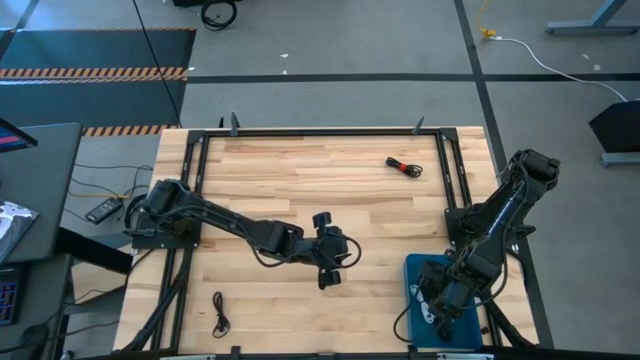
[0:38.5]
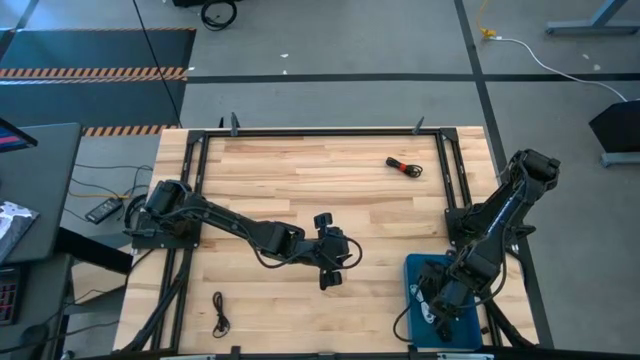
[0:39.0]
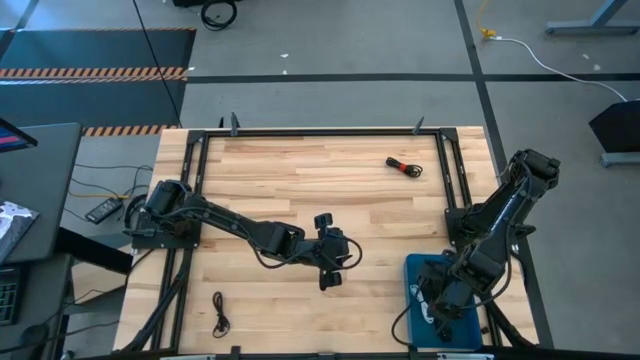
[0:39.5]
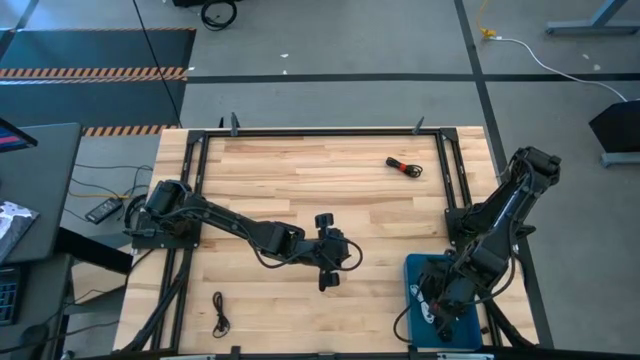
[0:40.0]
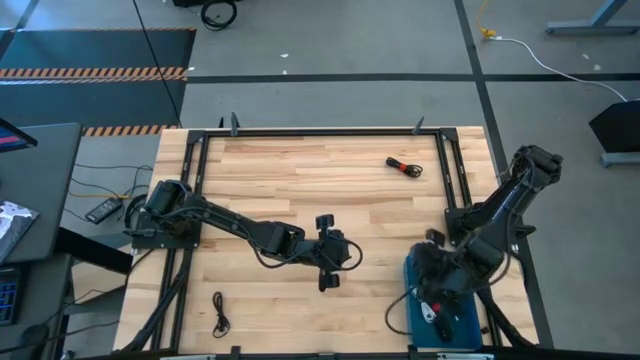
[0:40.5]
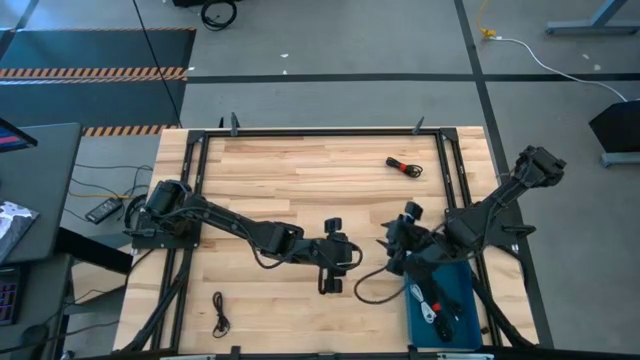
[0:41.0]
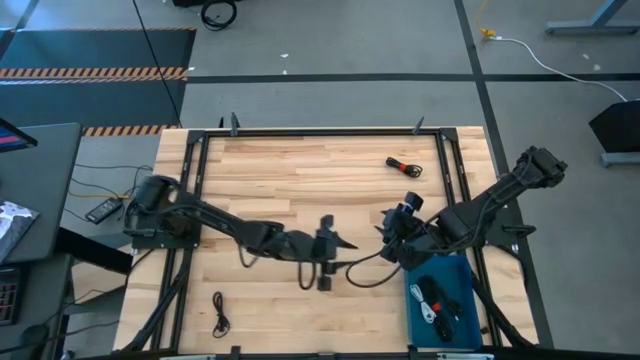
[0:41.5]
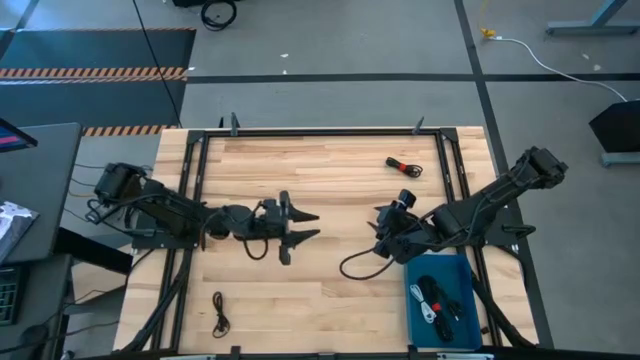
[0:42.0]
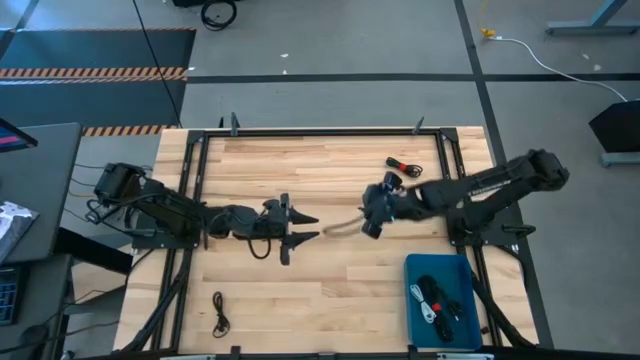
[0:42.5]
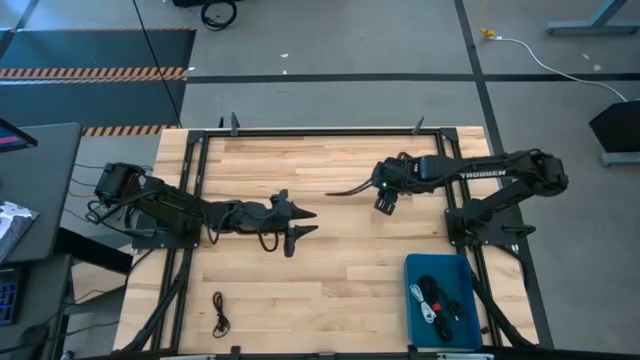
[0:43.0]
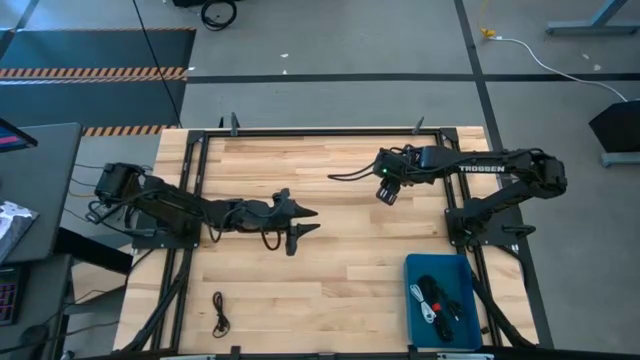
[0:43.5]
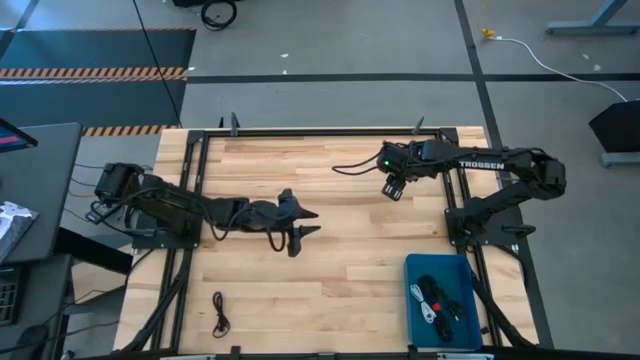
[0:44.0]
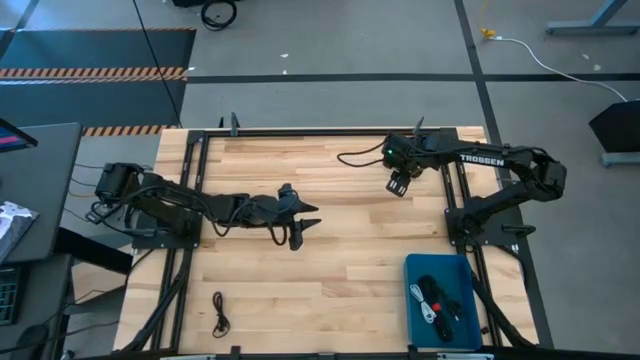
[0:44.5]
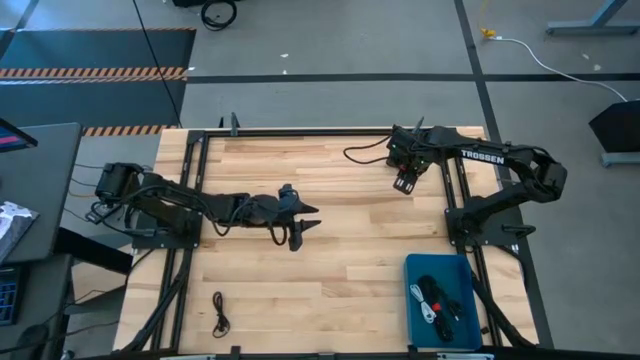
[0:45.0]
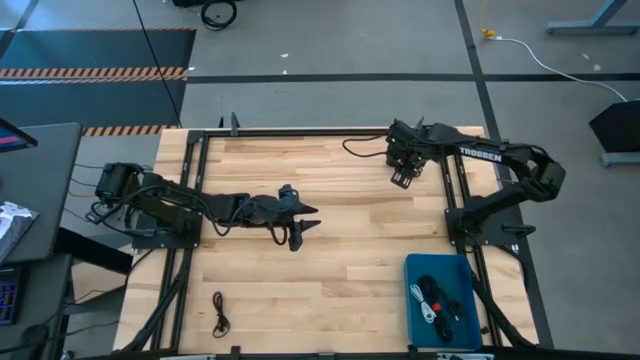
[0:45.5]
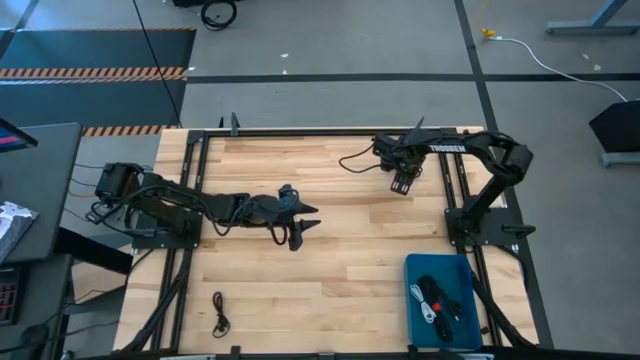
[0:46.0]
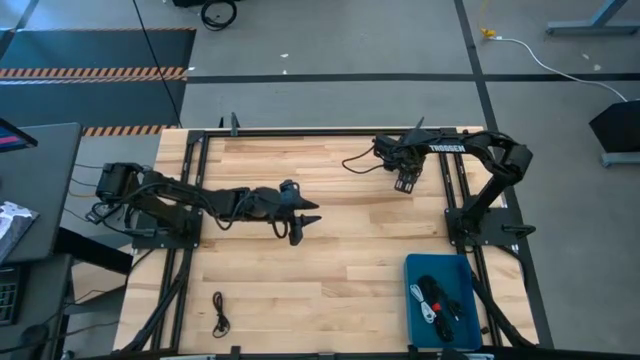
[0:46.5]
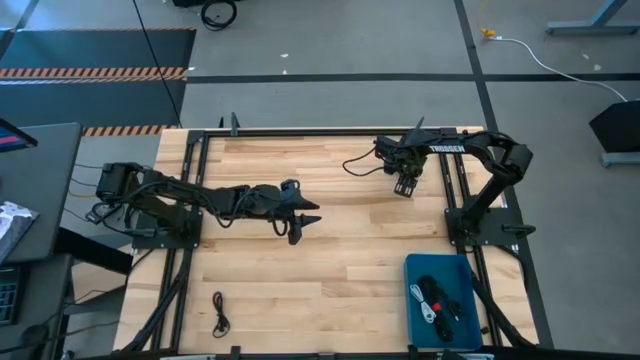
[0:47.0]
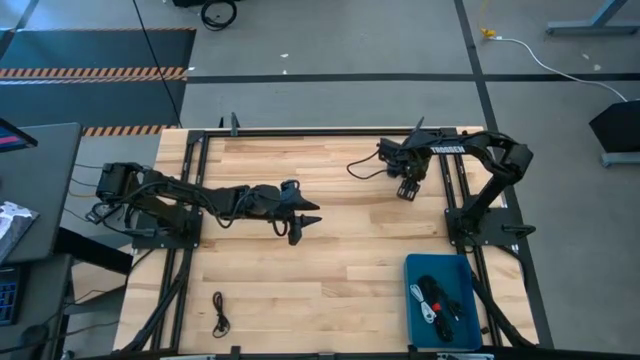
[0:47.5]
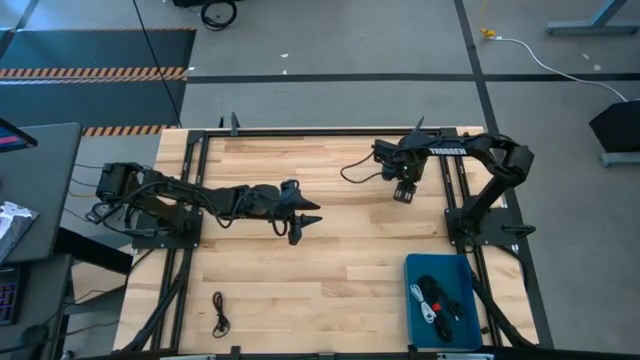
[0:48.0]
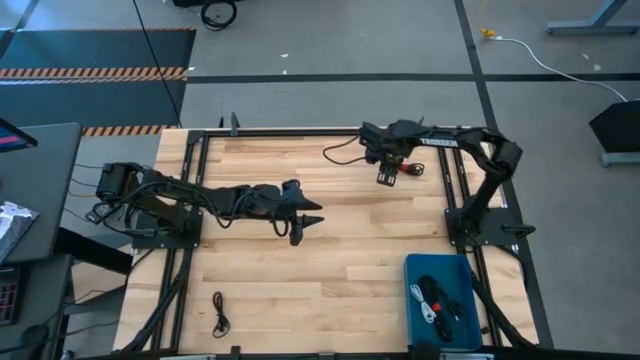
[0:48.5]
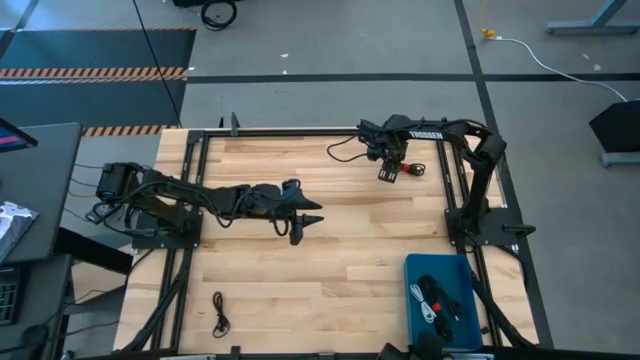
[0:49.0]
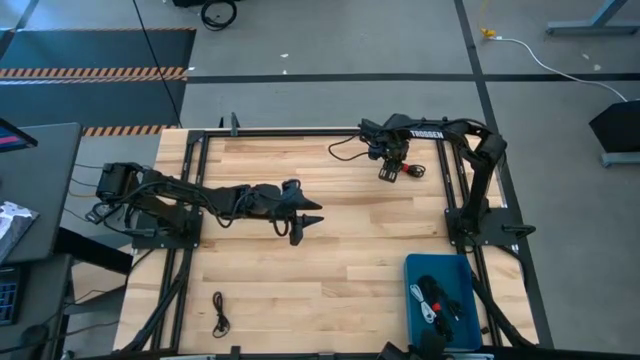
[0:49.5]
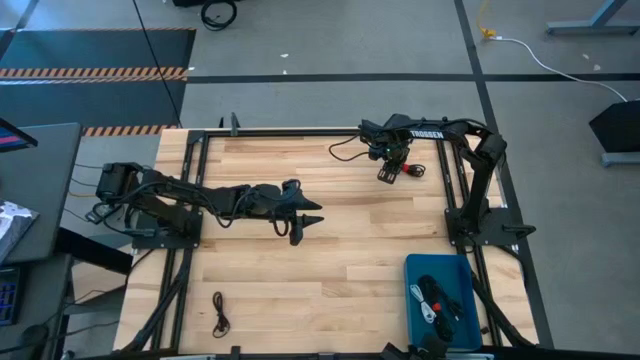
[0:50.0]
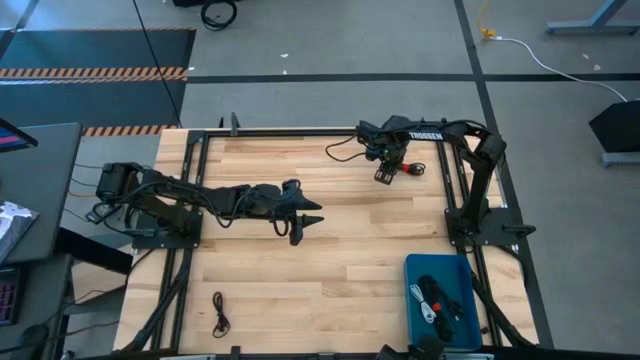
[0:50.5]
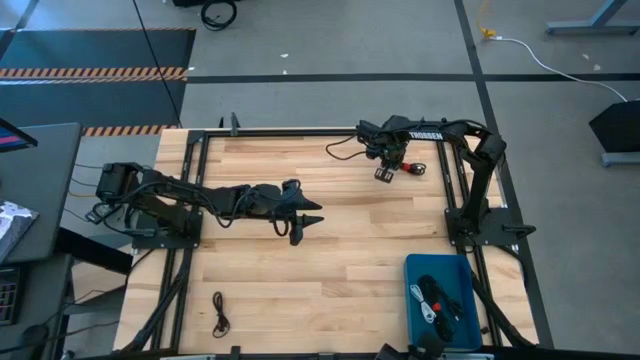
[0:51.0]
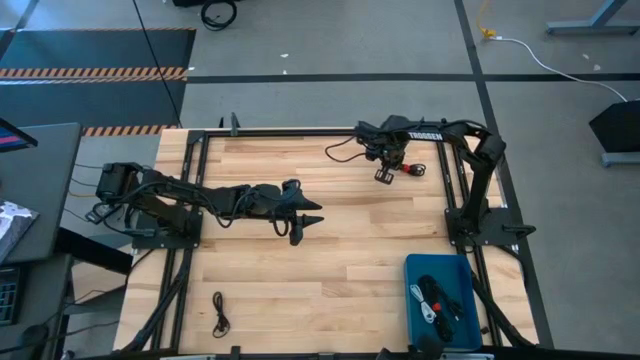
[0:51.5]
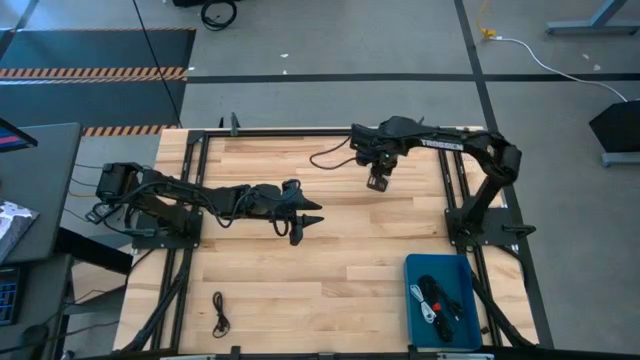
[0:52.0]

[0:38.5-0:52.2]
Task: Pick and place USB-C Cables
Put the black USB cable into the blue bin

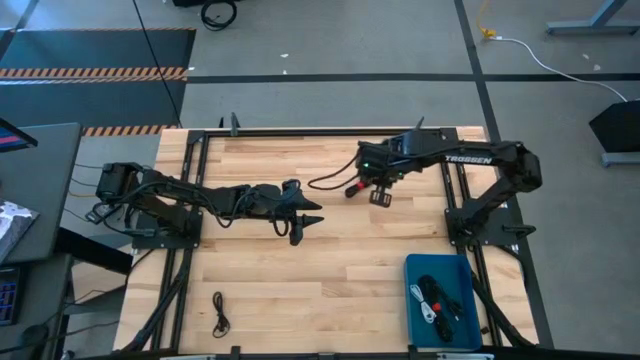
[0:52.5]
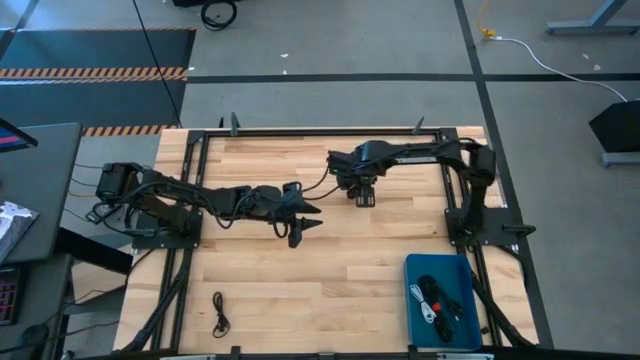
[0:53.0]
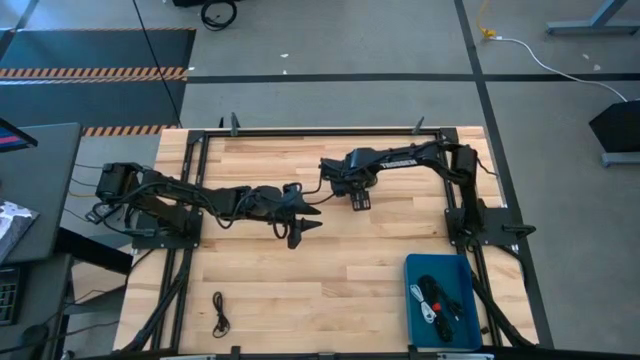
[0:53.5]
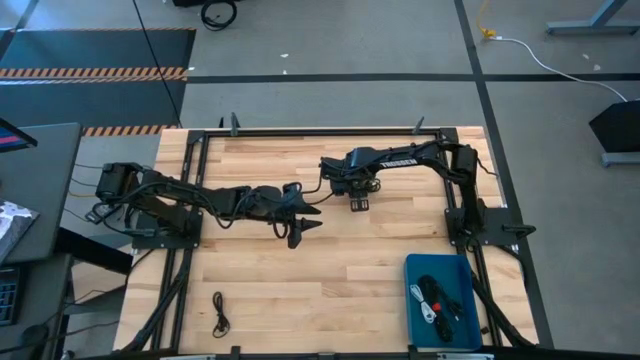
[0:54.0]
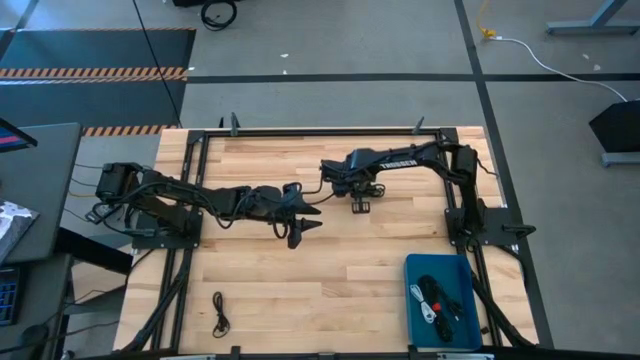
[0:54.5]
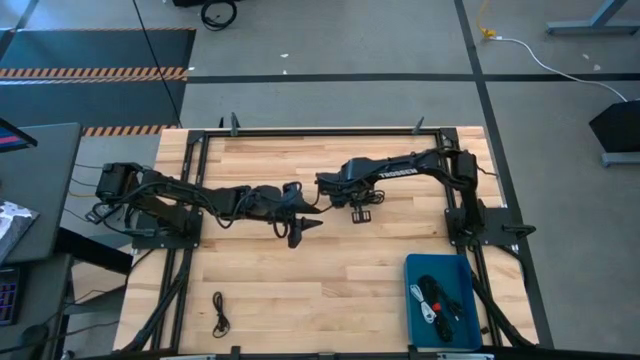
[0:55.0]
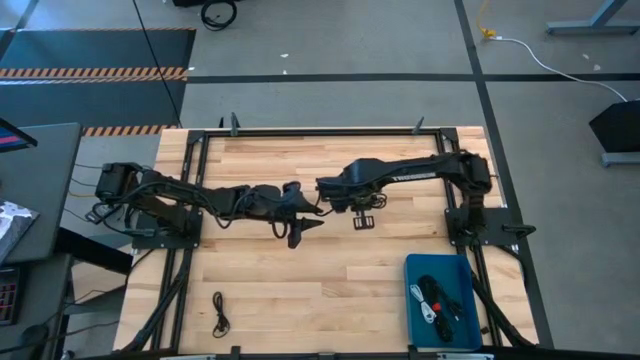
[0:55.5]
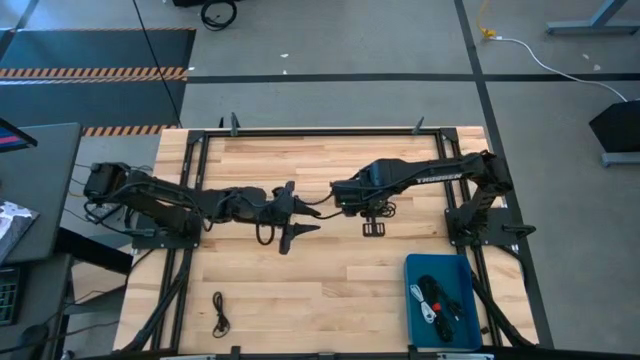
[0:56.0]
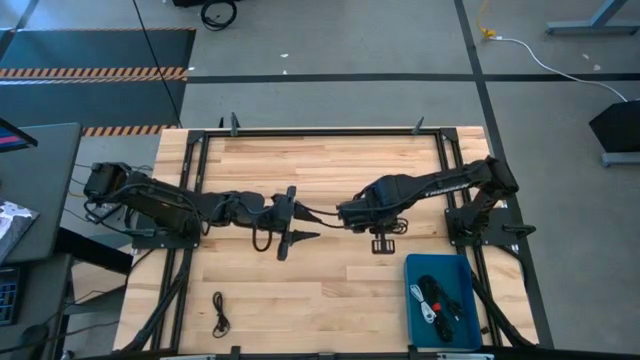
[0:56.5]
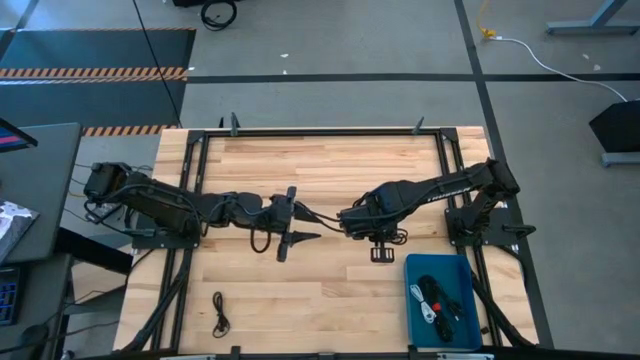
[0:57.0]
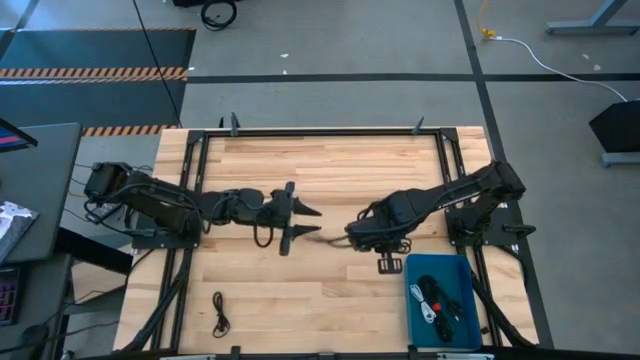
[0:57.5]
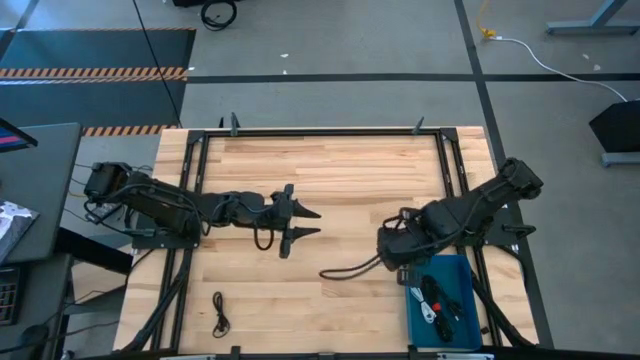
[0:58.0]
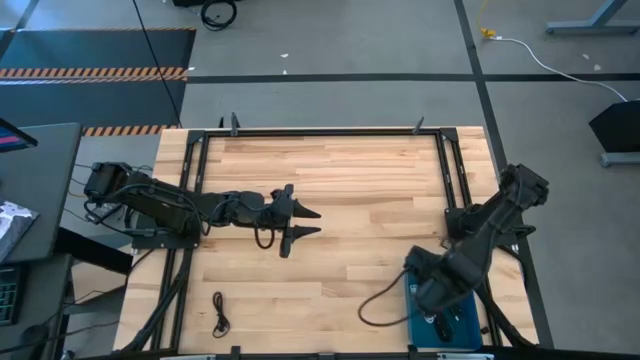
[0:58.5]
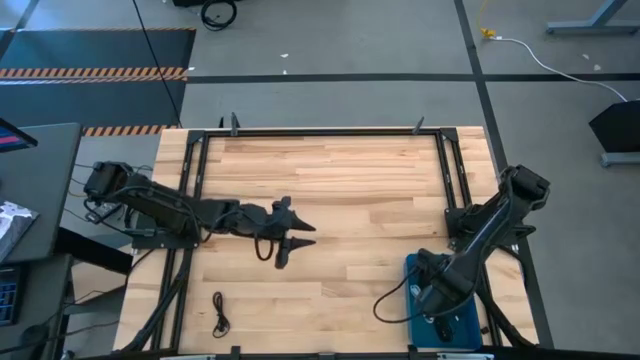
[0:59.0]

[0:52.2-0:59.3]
Put the black USB cable into the blue bin

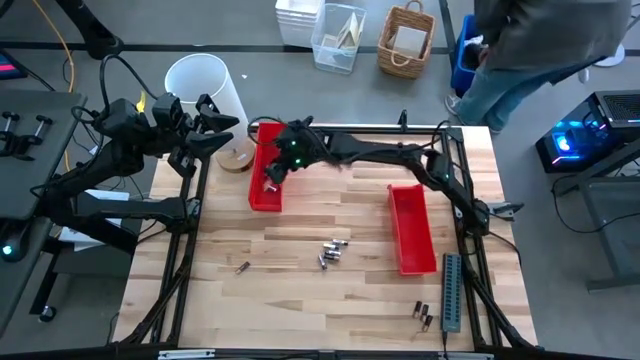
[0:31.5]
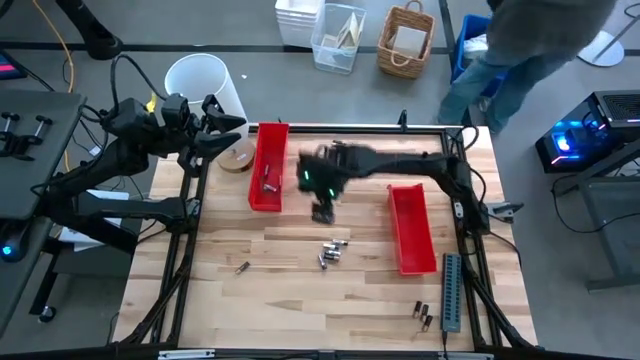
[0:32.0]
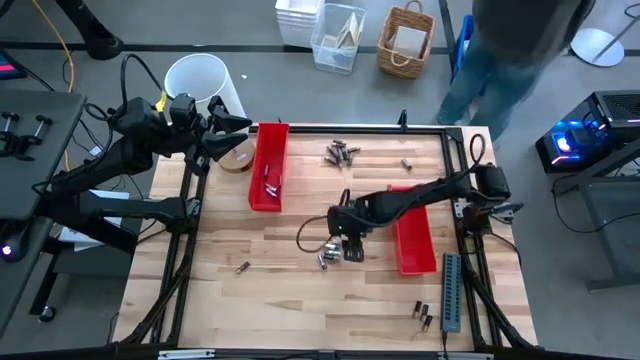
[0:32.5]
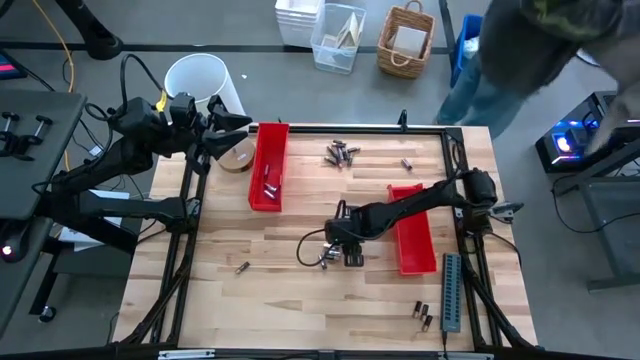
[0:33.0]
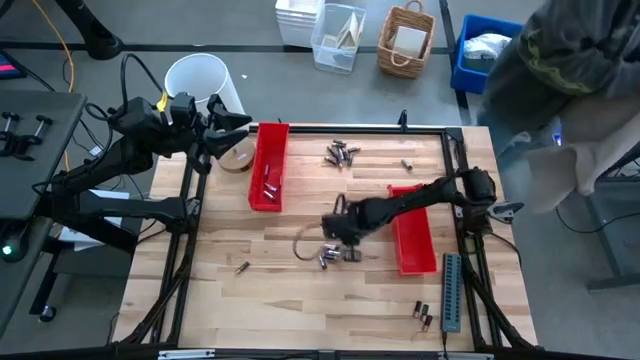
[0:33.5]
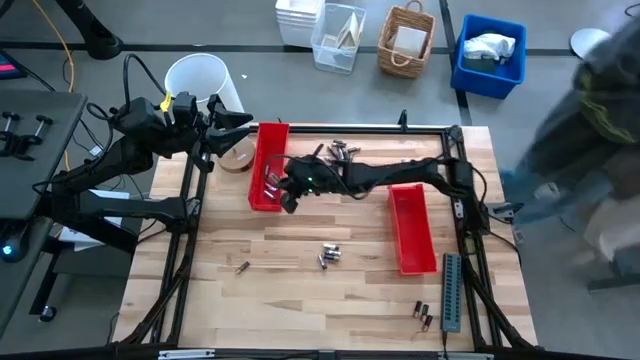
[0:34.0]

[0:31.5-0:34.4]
Task: Sort batteries
Put the silver battery into the top red bin
